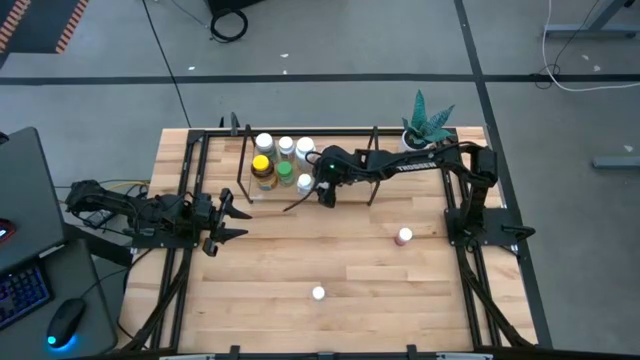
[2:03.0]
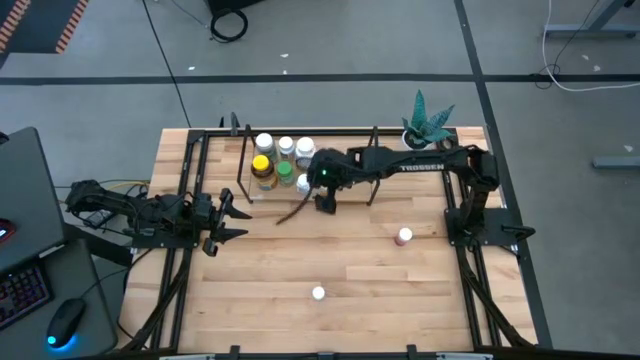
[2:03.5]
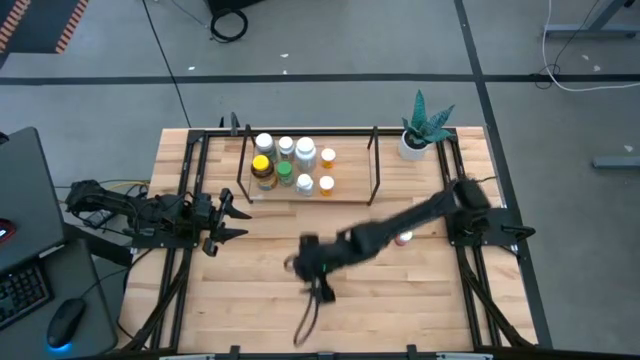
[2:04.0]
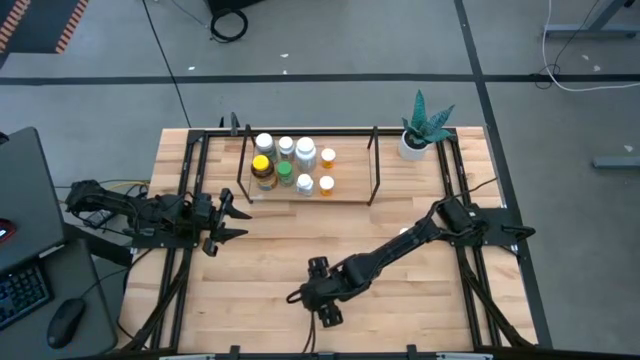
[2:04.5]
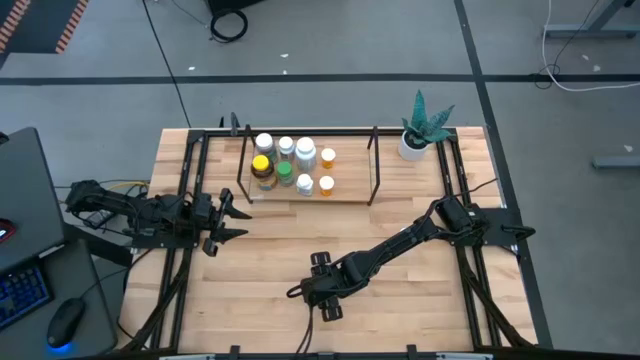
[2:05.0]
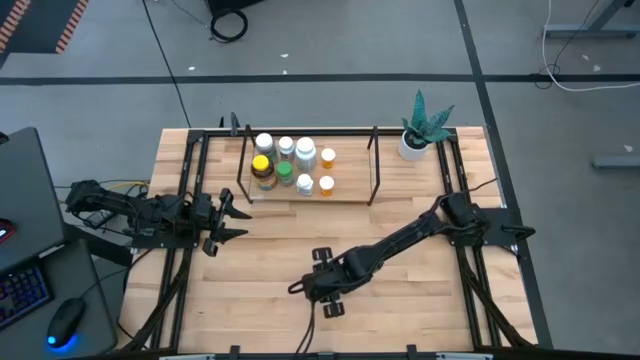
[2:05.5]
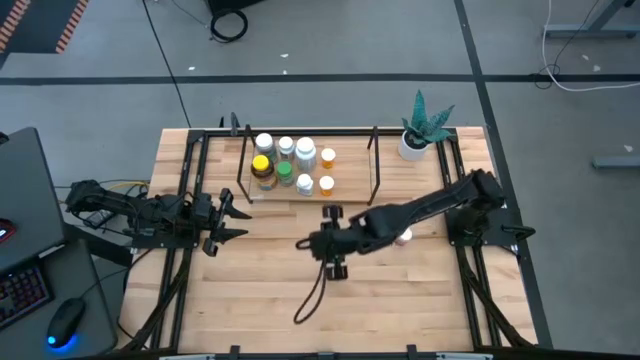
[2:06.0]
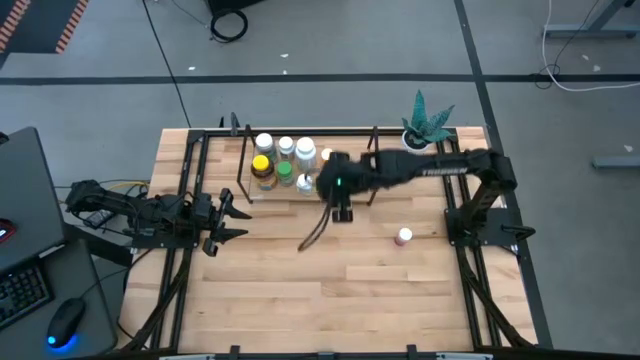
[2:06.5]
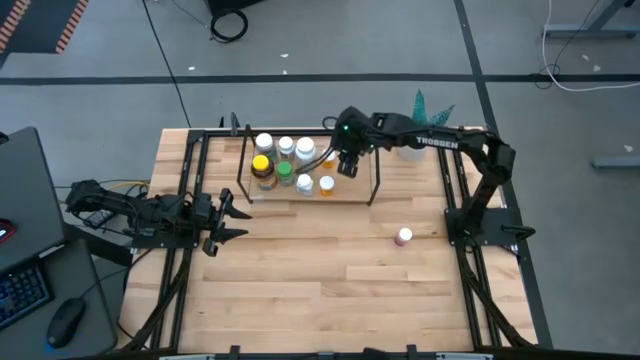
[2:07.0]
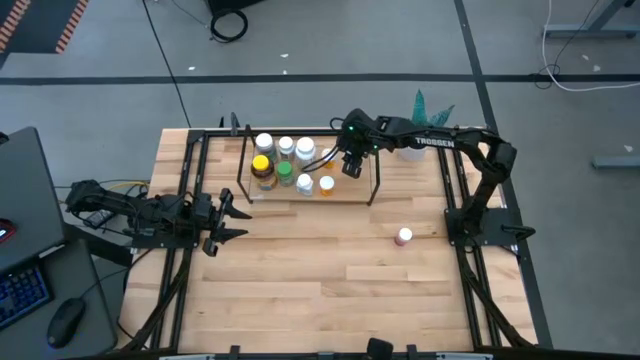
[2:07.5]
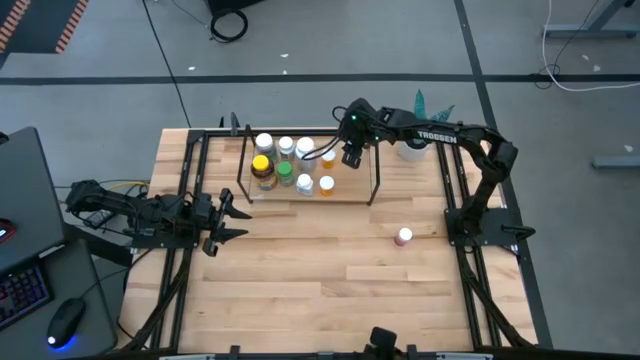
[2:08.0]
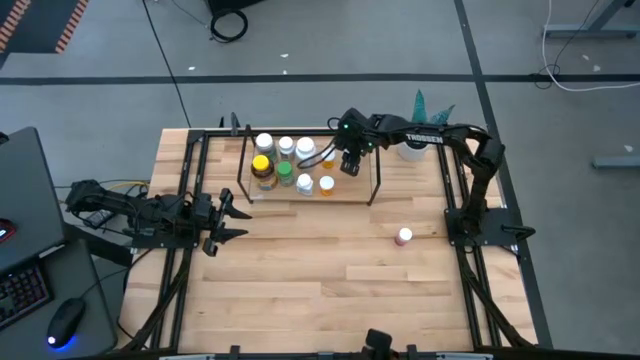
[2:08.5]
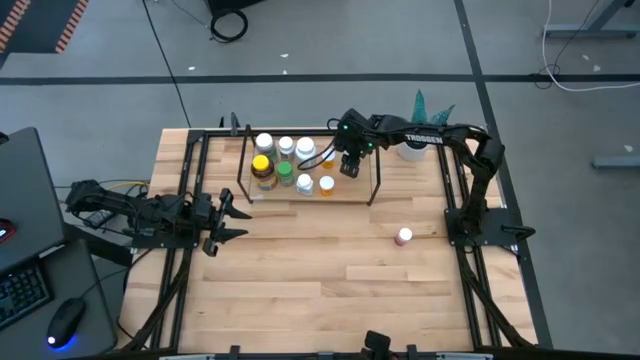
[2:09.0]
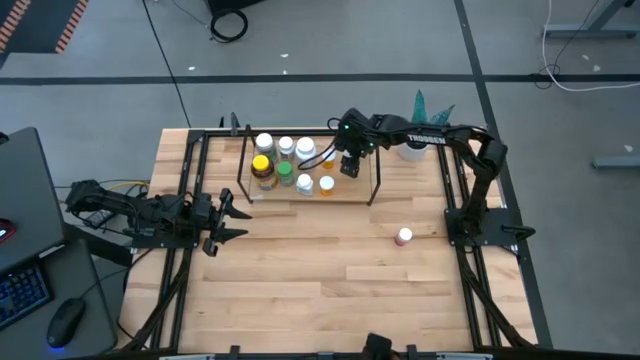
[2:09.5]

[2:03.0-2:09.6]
Task: Pick and place medicine bottles onto shelf by color
Put the white pill bottle on the shelf

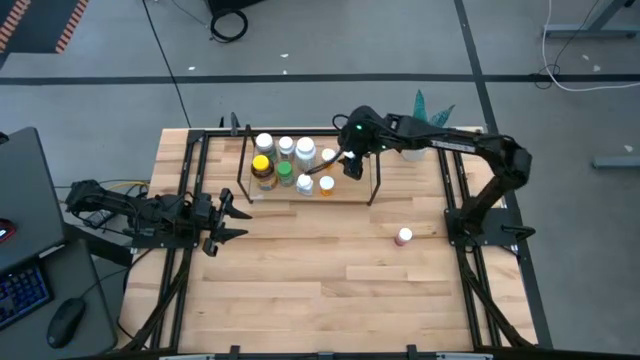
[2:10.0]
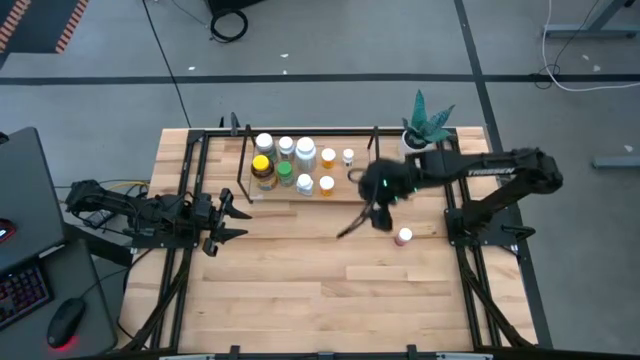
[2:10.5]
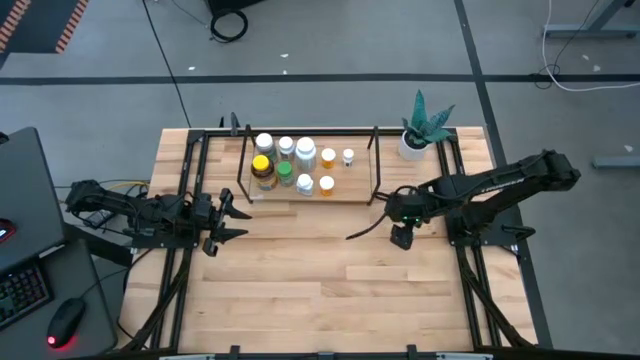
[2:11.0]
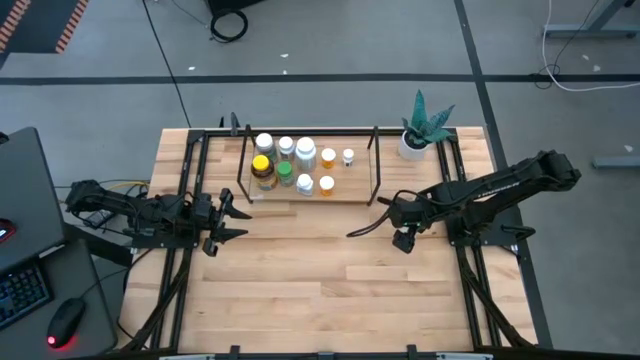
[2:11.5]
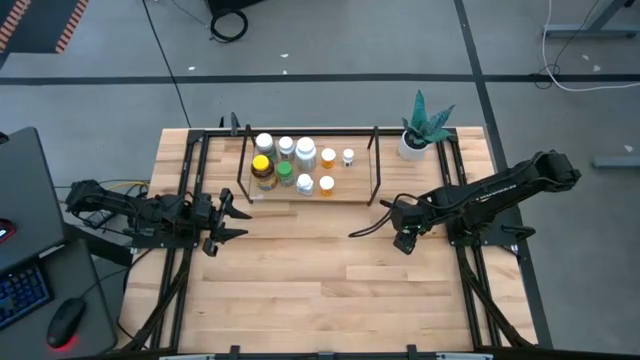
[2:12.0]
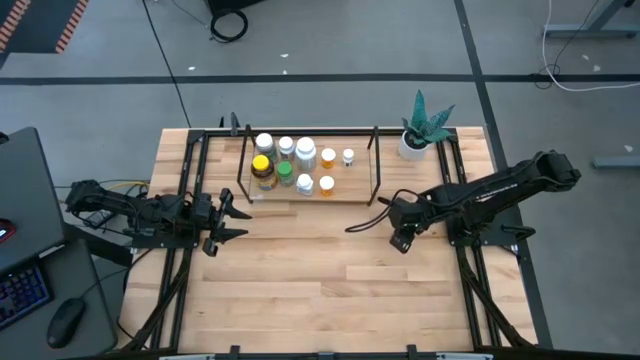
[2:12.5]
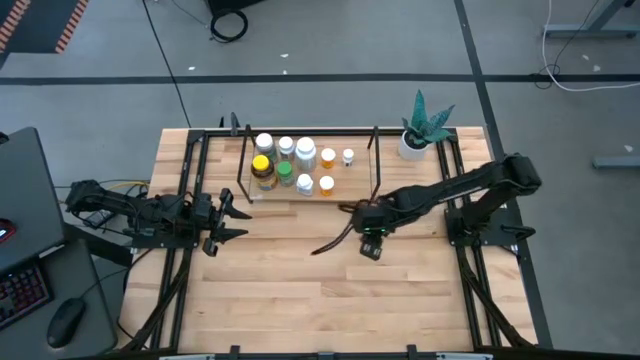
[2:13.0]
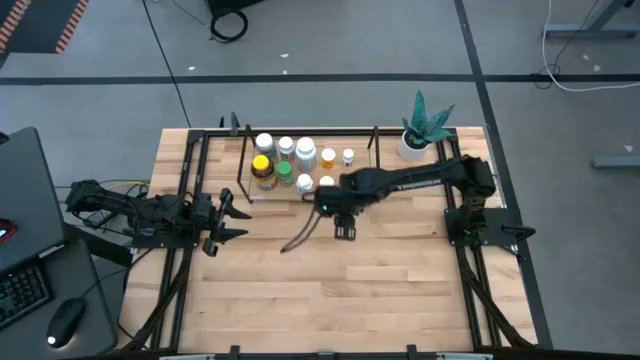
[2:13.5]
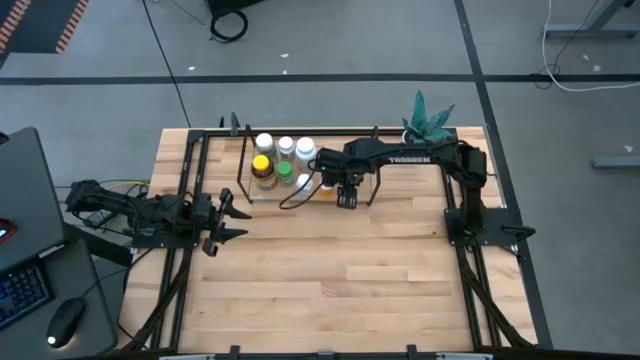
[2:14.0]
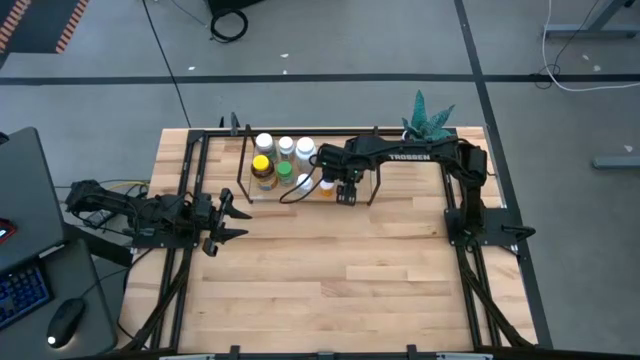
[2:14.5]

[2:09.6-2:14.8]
Put the pink medicine bottle on the shelf aligned with the other white pill bottles

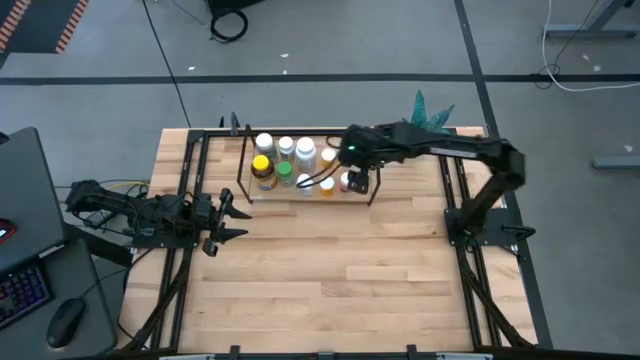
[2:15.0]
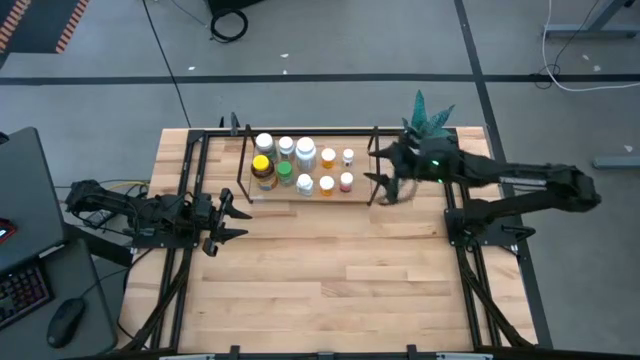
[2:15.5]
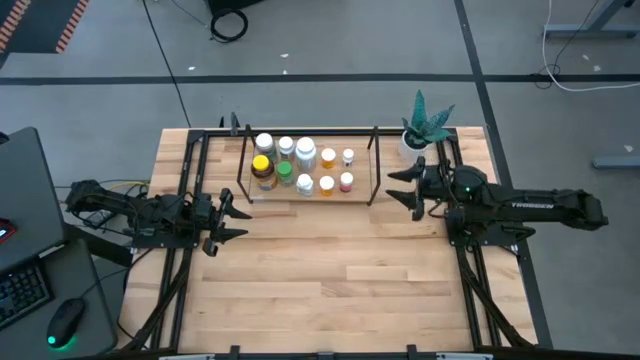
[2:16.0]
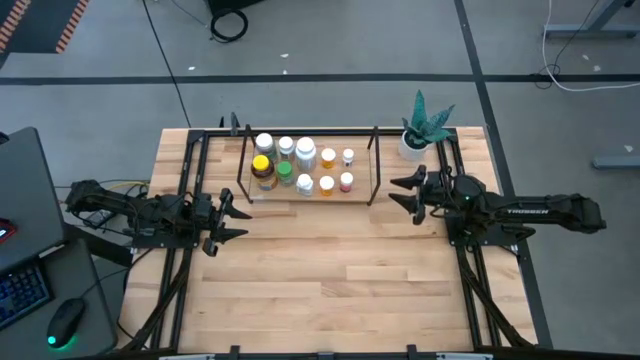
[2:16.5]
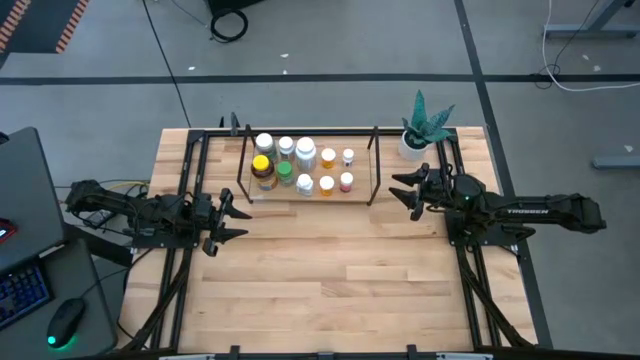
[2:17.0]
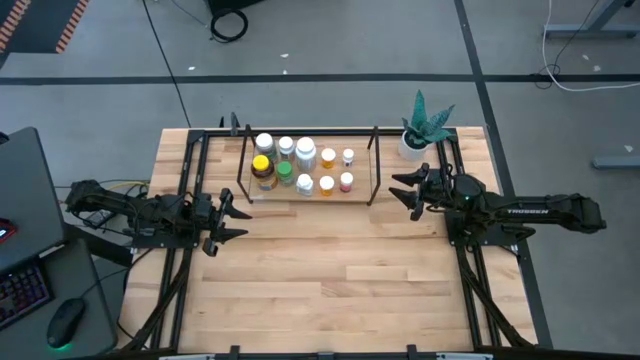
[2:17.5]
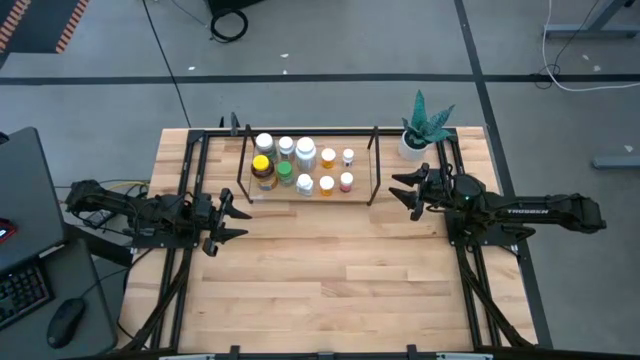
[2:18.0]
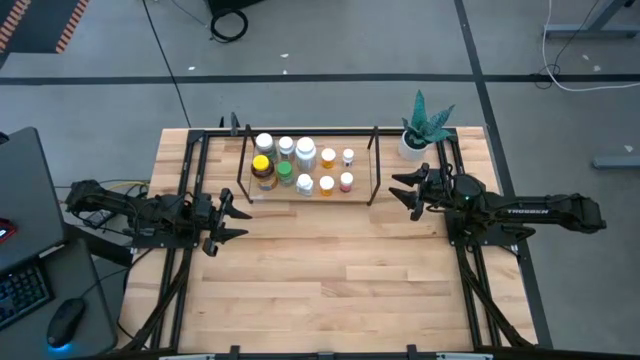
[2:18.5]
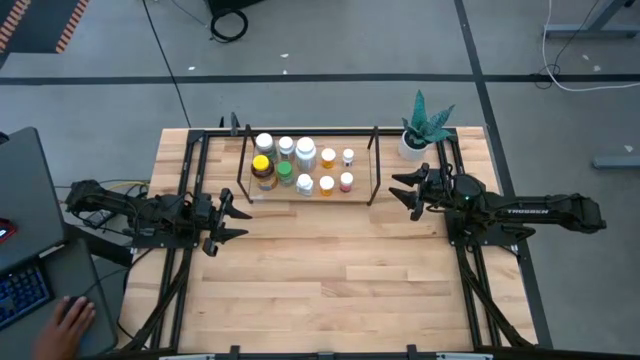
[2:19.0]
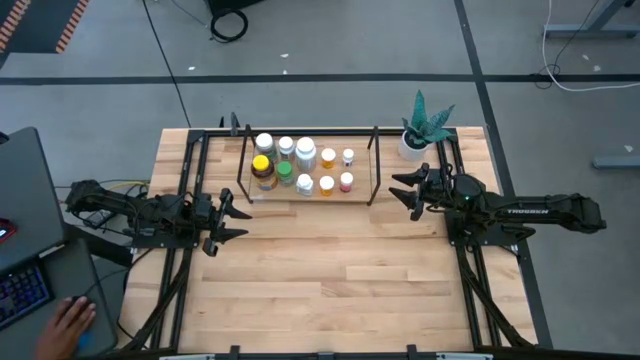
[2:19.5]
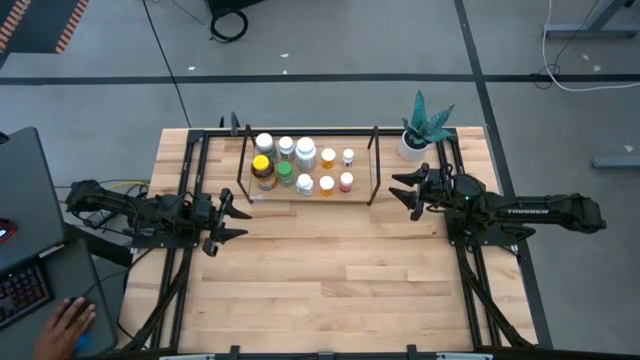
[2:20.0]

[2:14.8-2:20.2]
Return to Home Position

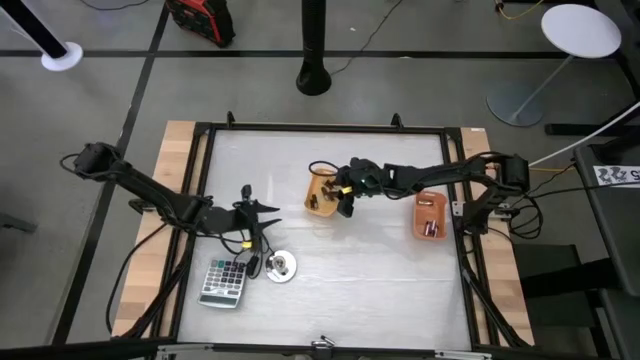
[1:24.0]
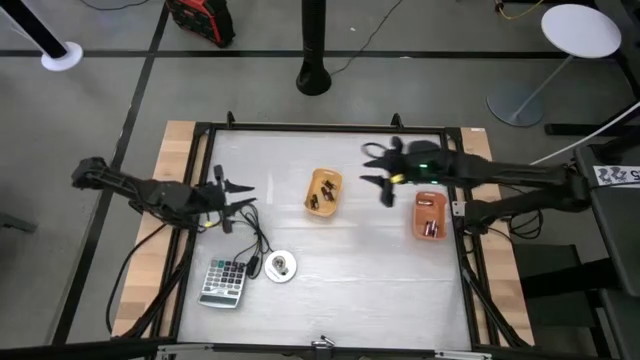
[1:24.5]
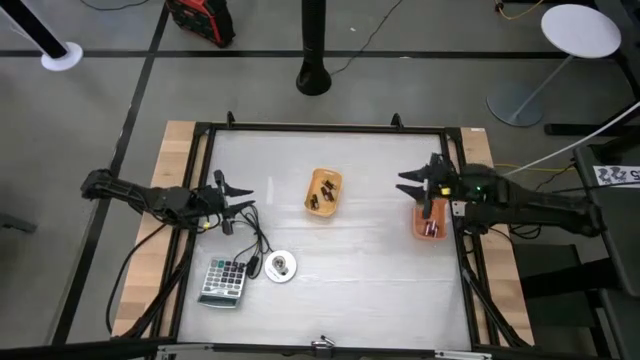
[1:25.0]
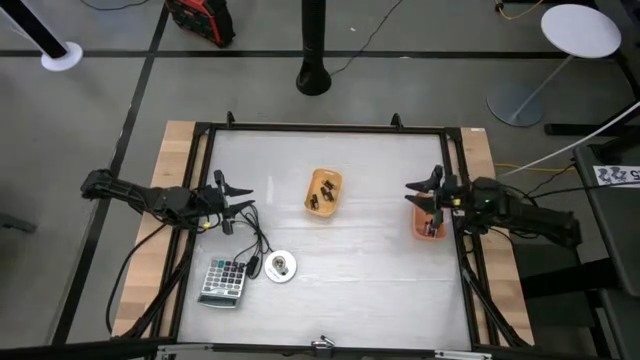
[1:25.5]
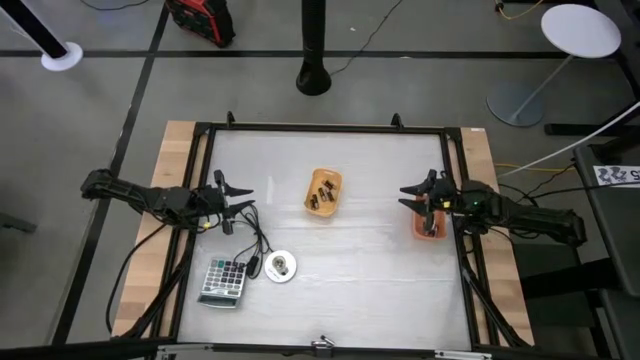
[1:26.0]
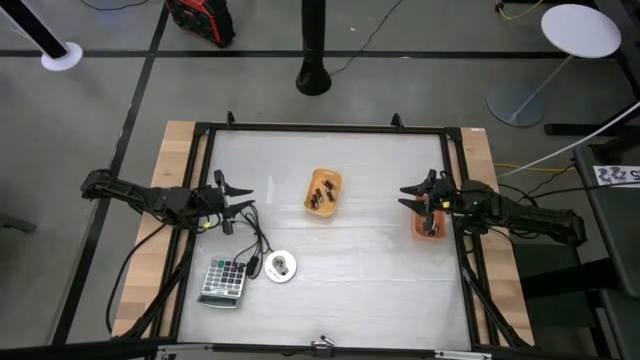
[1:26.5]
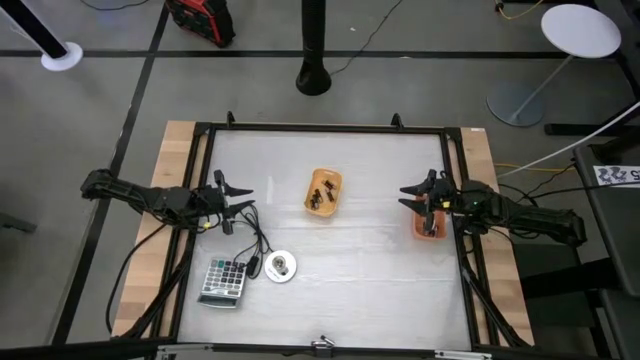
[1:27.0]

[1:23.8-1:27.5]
Task: Sort batteries
Return to Home Position
